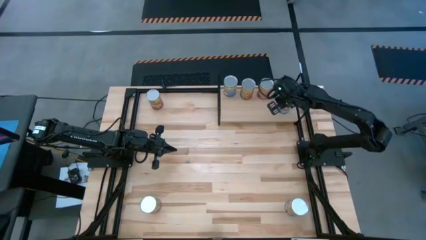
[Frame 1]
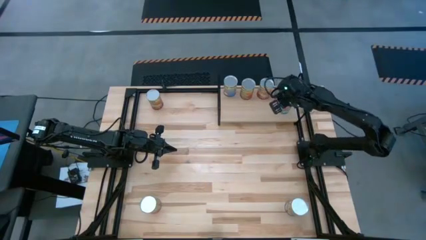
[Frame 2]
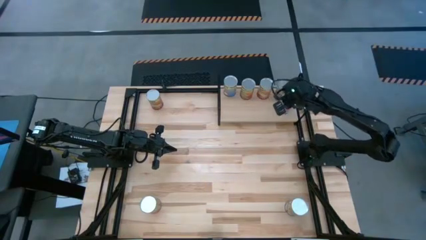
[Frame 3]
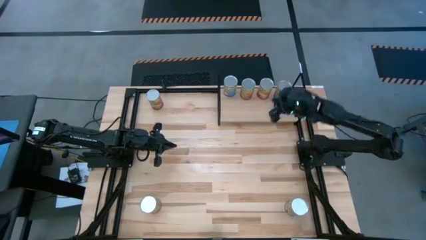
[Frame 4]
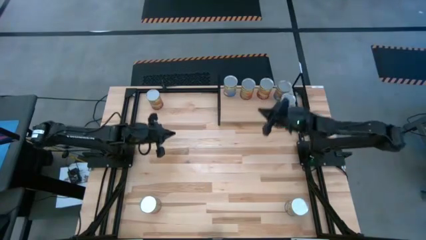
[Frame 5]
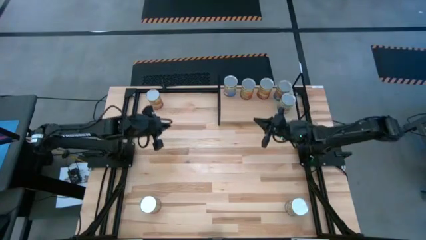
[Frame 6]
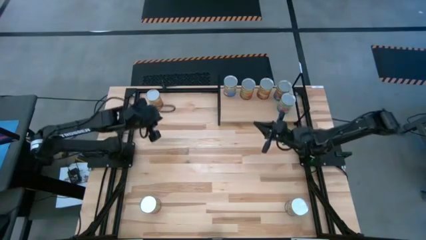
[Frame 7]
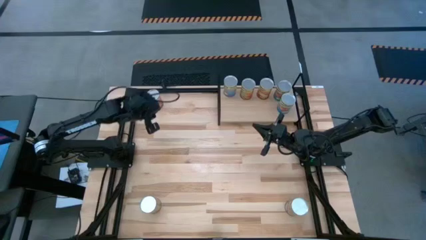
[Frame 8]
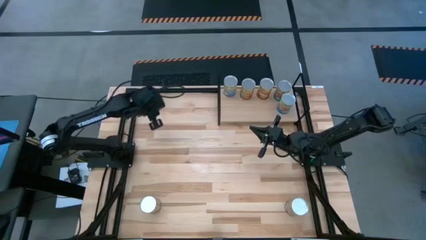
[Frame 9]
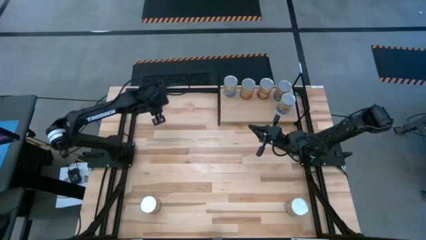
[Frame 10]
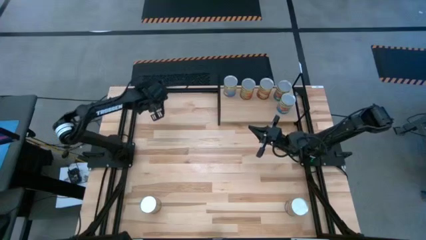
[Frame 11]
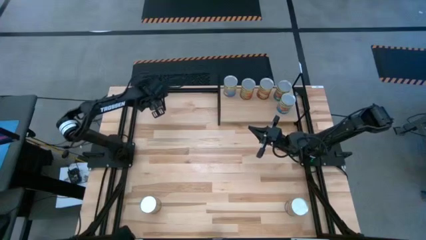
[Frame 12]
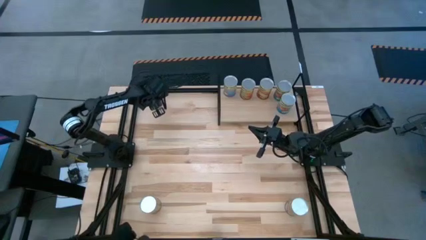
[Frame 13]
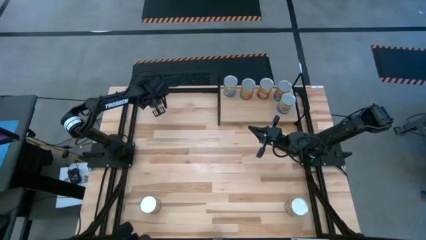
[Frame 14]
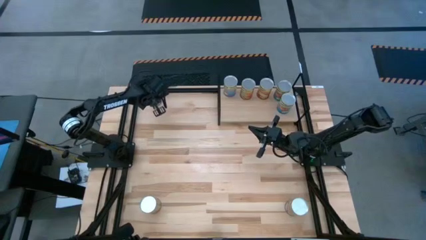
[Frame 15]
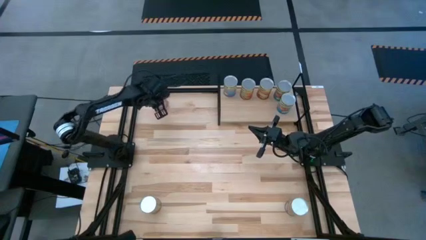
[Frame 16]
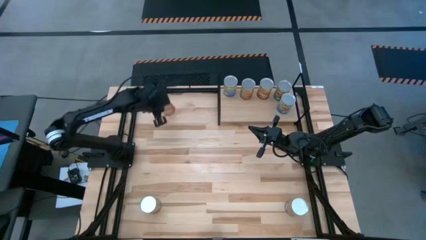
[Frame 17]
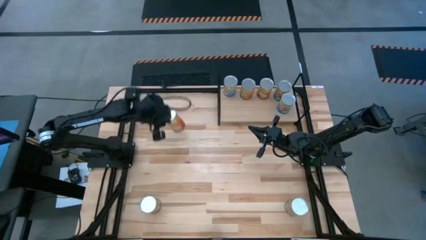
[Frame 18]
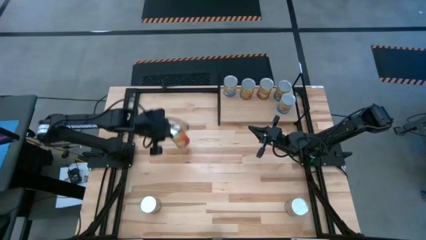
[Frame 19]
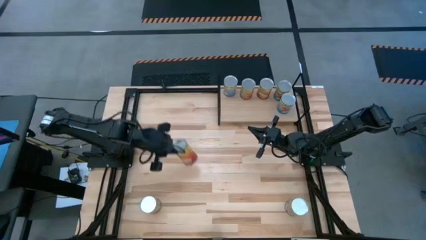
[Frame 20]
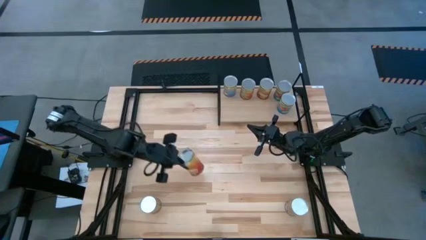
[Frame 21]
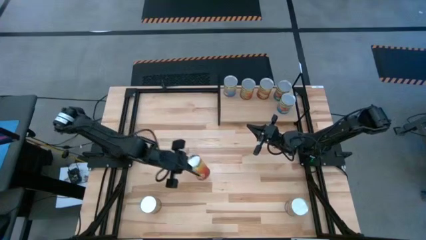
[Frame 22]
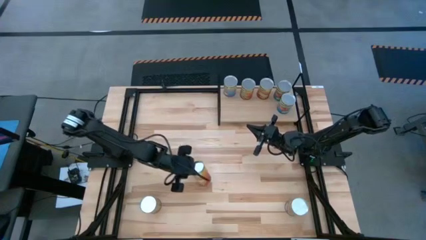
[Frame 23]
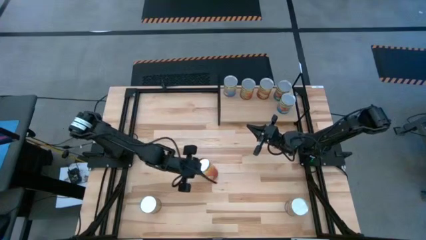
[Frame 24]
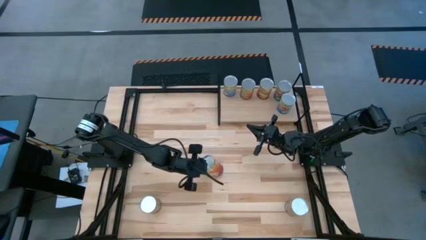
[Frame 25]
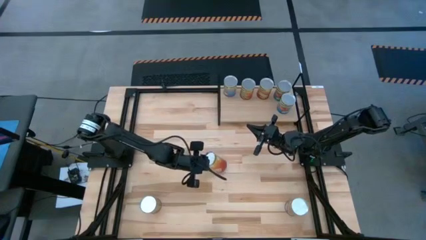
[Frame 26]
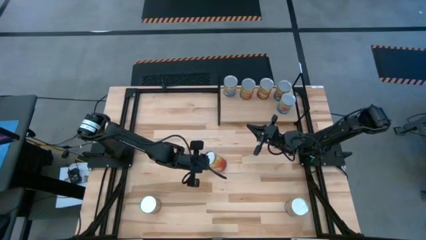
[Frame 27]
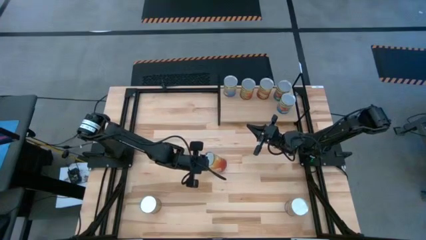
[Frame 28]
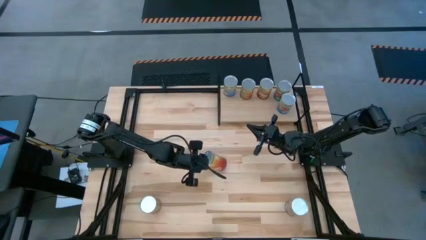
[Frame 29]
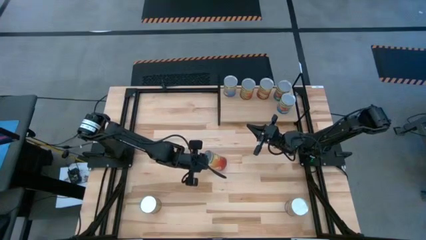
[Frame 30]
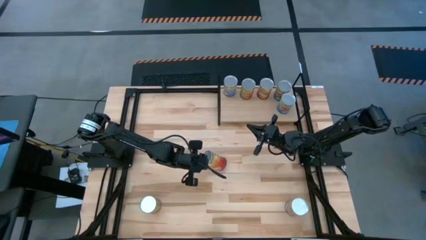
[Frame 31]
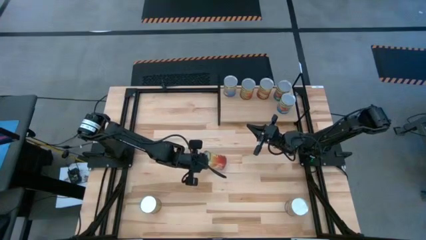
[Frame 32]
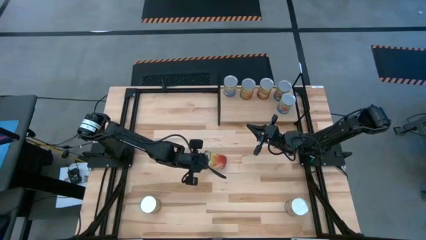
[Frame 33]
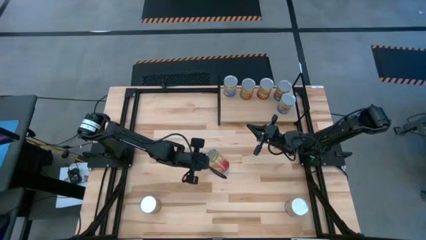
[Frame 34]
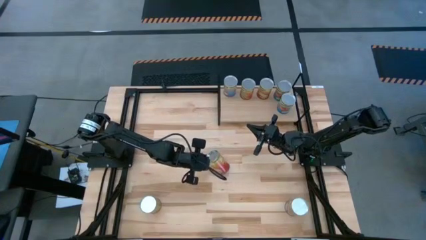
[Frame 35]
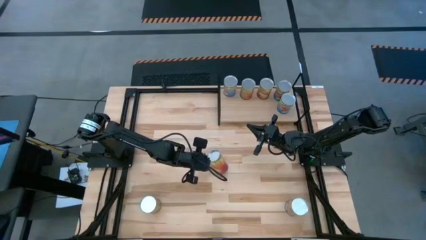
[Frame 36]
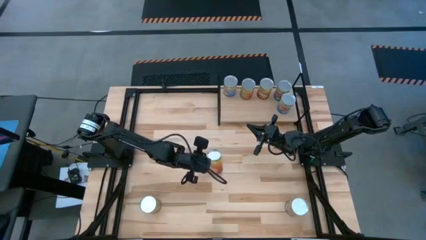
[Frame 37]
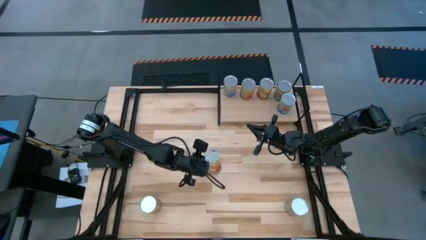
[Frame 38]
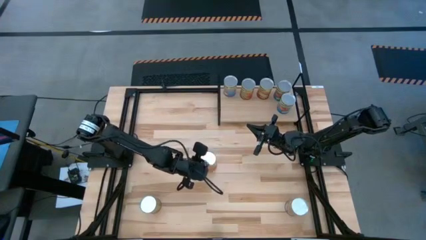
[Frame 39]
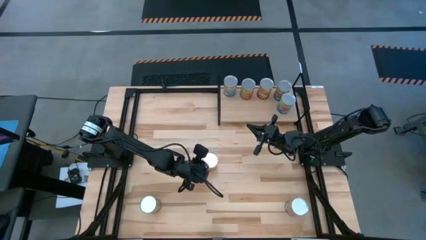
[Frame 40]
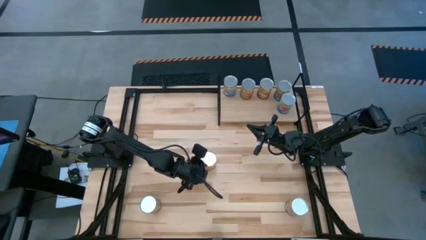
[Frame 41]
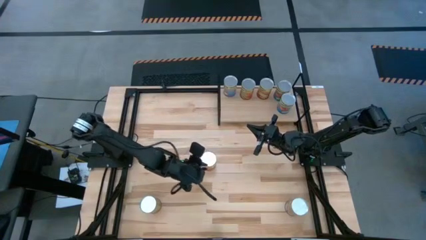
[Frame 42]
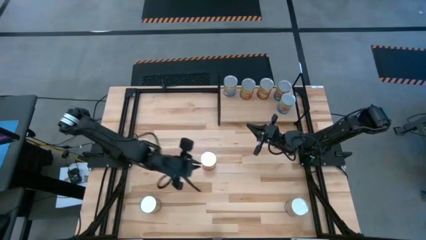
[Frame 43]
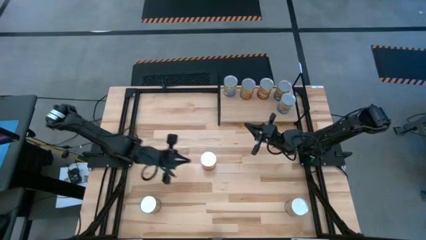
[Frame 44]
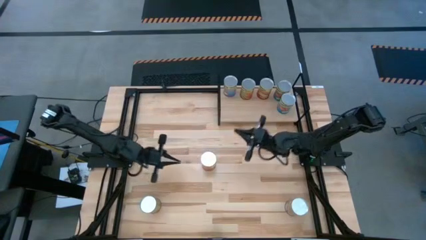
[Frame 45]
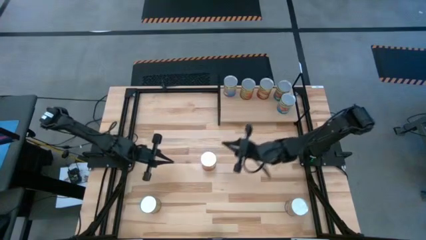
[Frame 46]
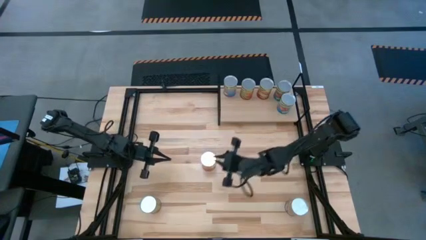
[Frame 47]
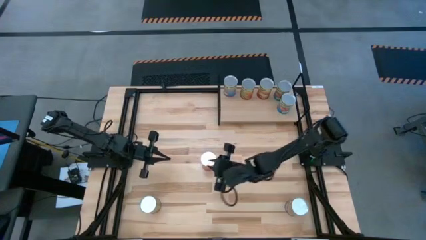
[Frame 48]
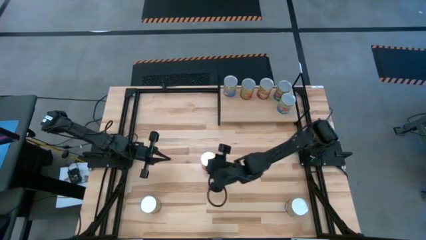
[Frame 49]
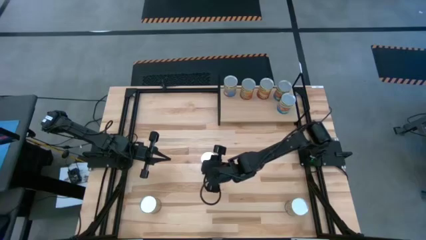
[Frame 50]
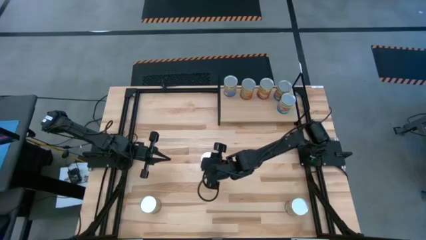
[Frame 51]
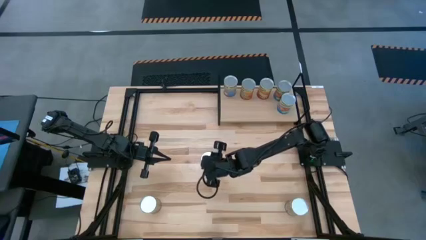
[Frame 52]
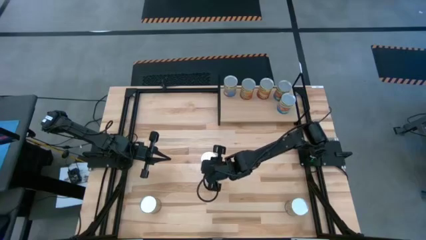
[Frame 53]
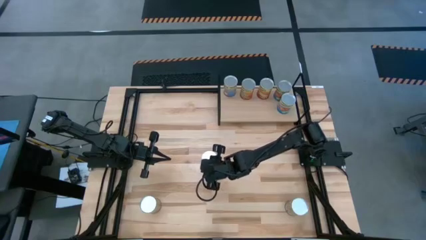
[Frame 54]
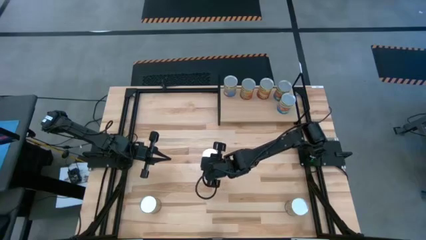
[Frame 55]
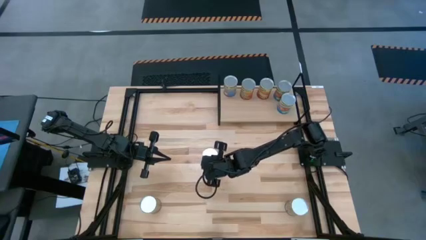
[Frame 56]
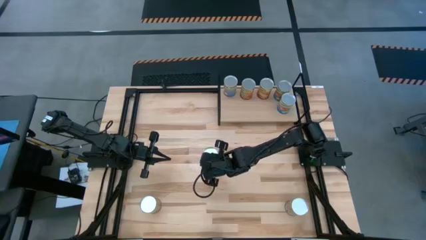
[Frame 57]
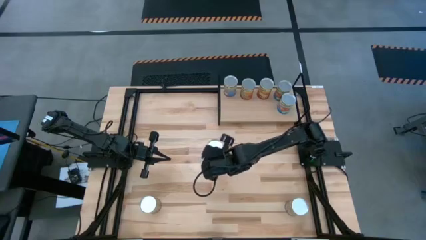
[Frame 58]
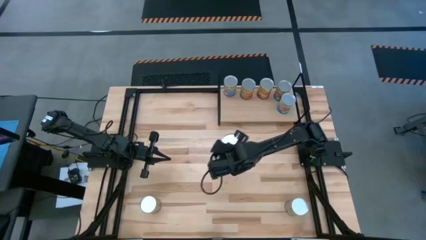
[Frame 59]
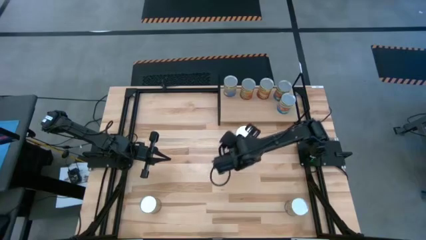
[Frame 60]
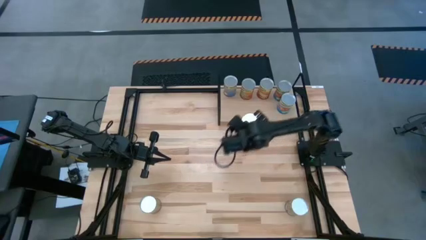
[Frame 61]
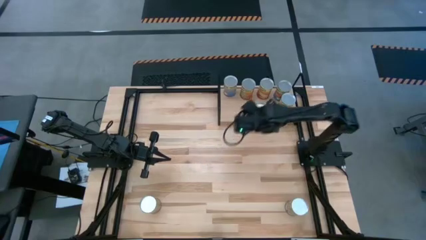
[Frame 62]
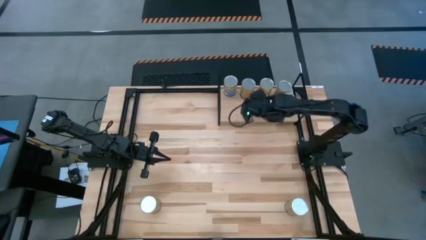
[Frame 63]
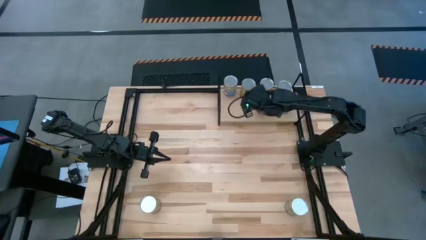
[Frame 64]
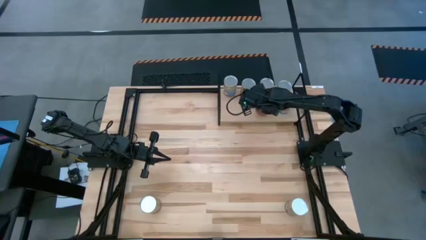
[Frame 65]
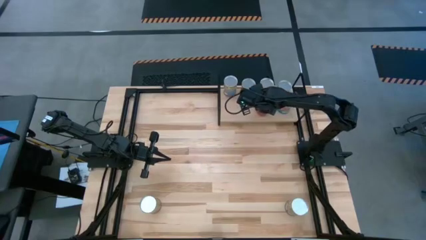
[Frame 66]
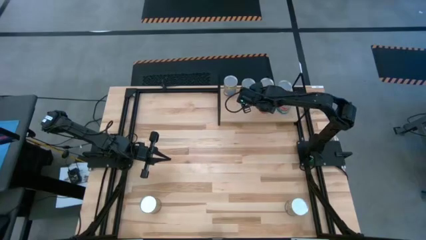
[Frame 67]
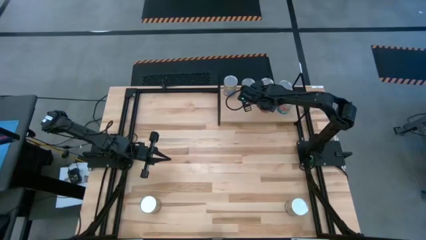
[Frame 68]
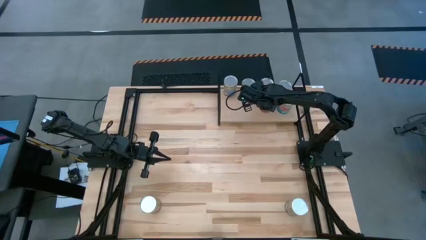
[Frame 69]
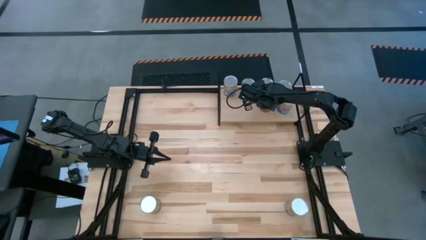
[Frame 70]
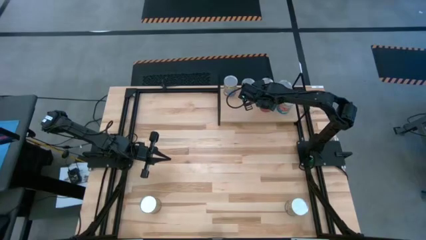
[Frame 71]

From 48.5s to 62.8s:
Task: Pick and place cans onto a shelf
Put the canned corn on the shelf aligned with the other canned corn
